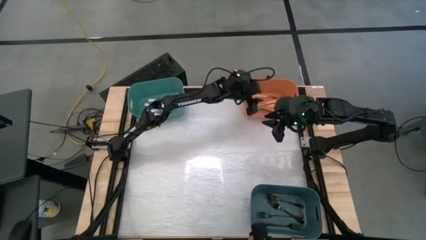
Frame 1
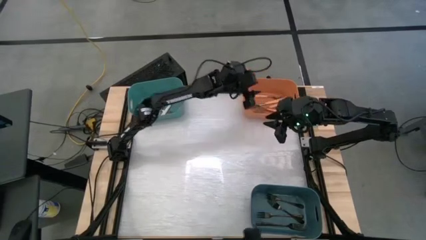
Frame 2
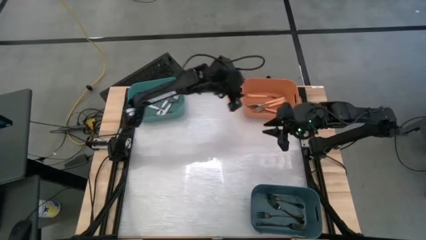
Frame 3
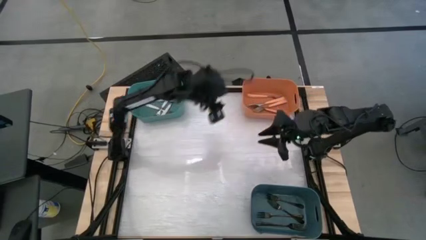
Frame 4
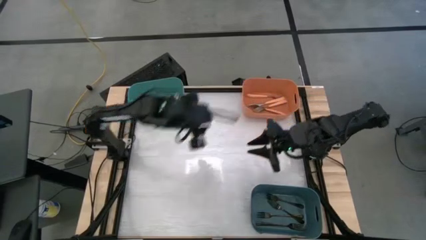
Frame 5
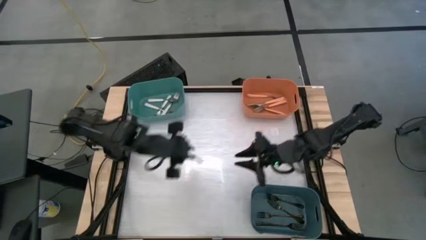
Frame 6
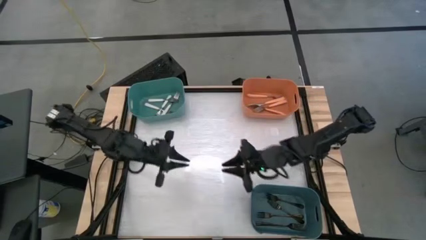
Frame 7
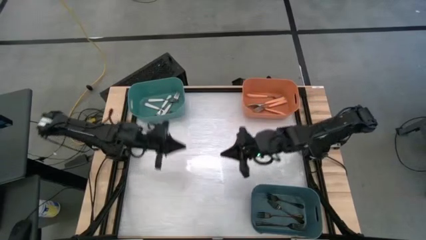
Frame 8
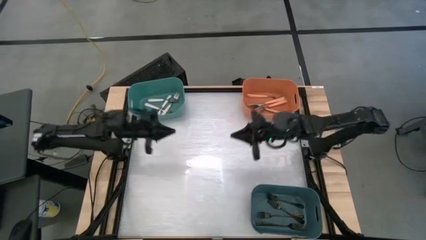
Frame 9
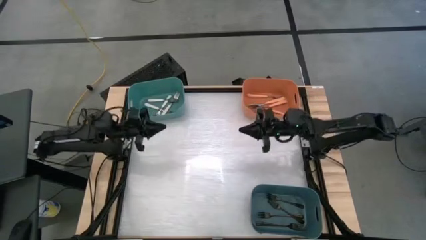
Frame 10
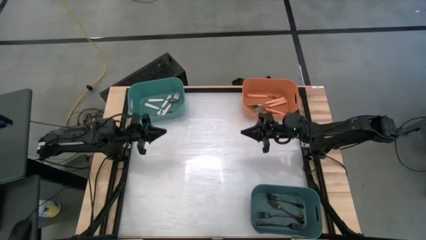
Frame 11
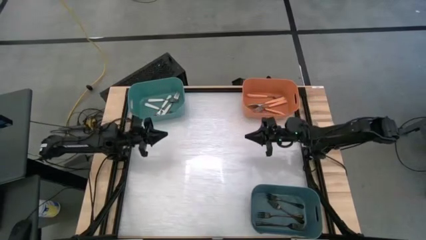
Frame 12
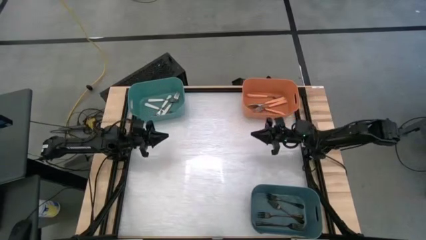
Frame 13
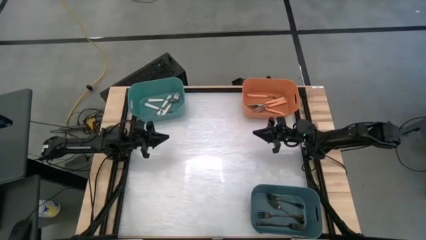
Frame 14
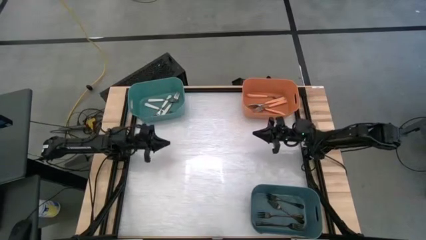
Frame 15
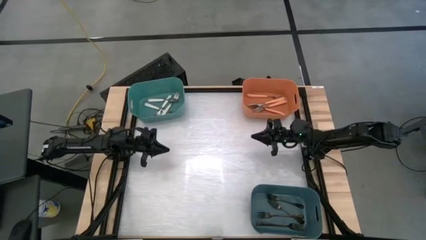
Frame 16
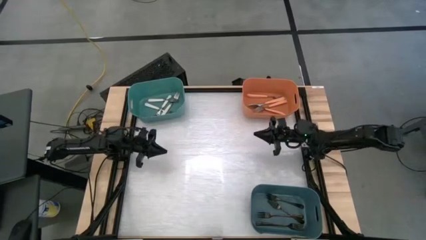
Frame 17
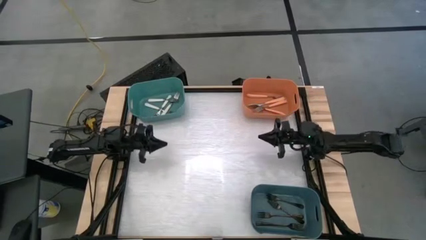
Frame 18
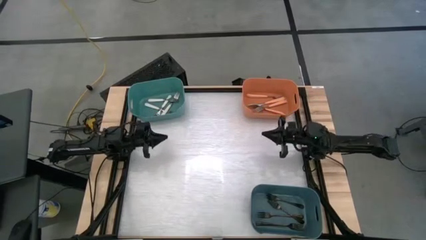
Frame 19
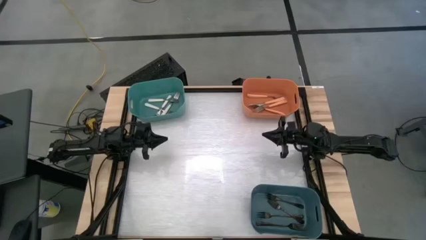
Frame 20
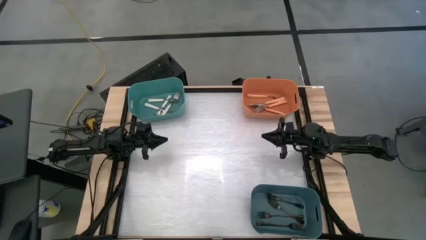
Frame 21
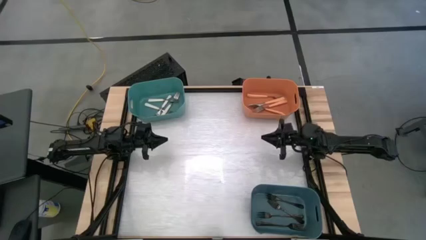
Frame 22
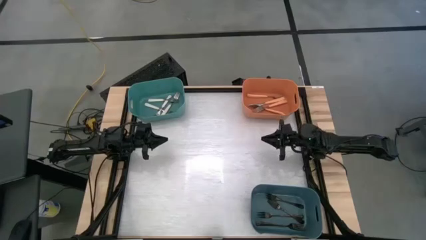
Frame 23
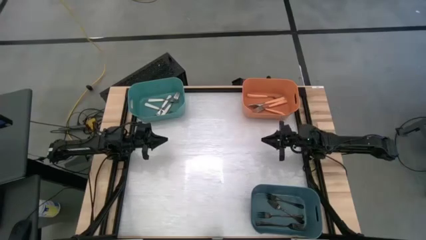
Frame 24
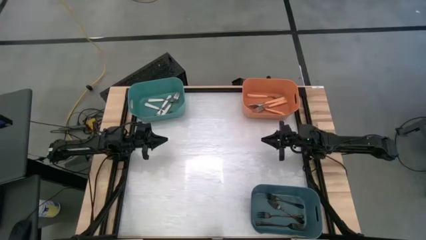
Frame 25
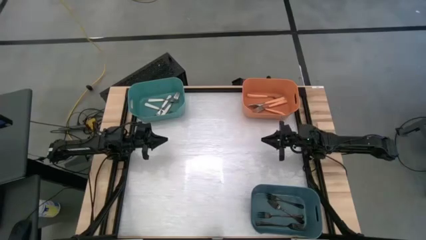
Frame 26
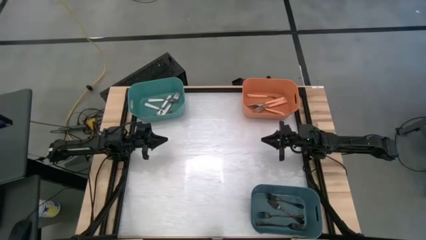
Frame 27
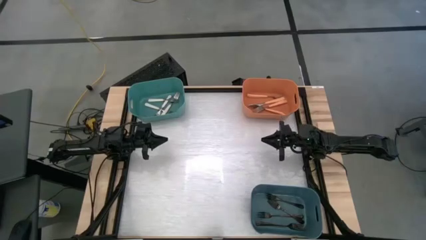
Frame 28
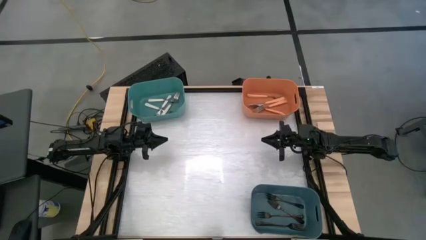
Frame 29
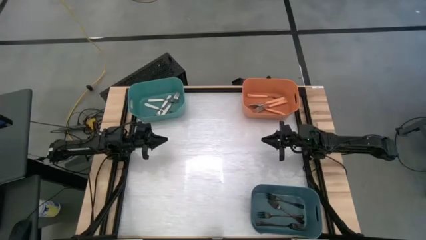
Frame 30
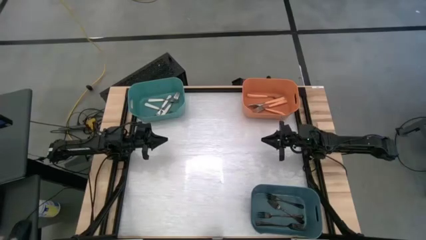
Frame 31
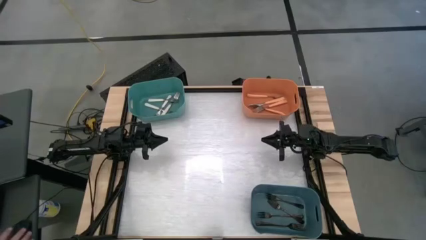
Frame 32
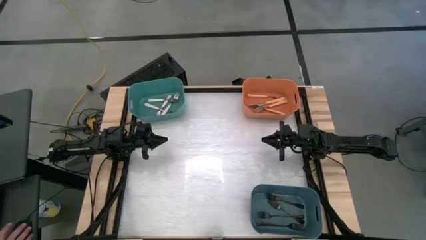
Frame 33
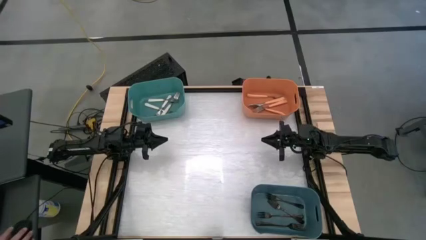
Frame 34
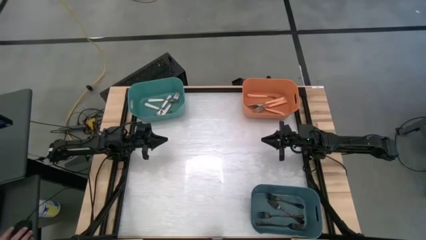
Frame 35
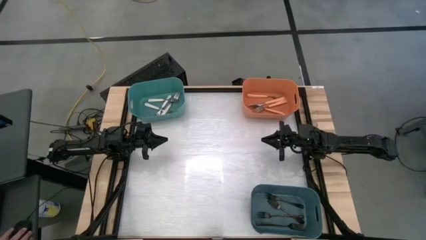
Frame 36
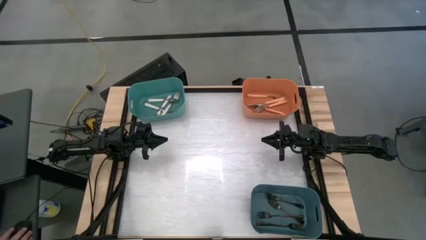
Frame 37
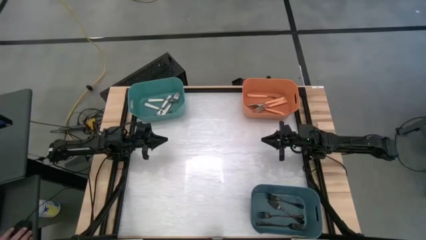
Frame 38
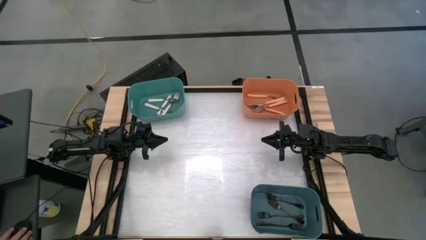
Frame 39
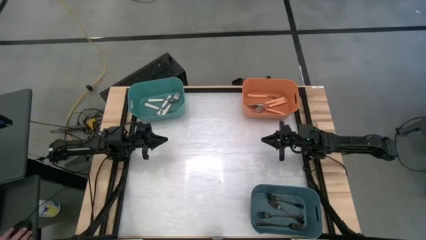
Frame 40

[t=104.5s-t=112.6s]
Task: Sort silverware by color (type)
Return to Home Position

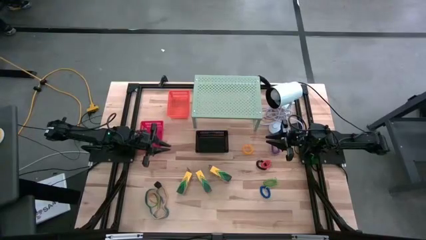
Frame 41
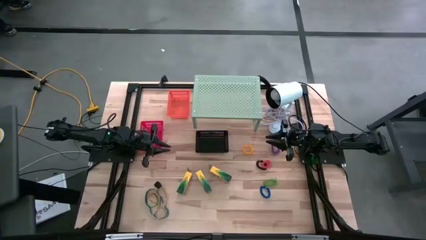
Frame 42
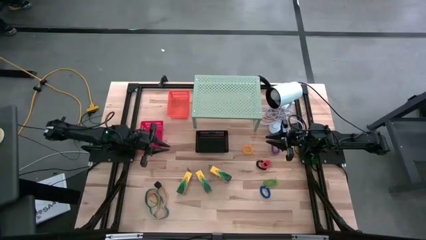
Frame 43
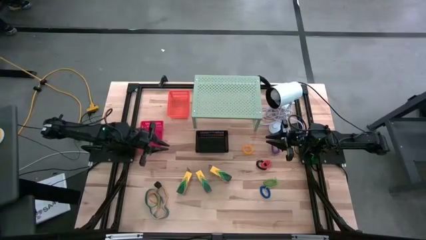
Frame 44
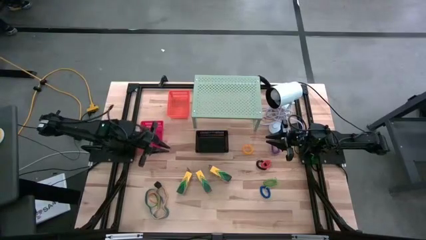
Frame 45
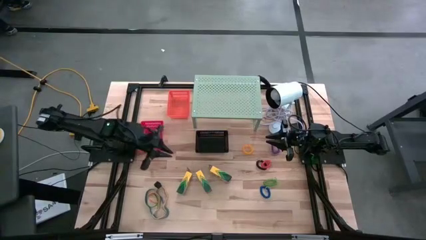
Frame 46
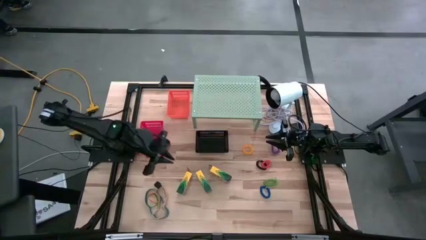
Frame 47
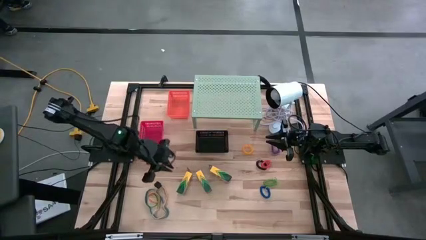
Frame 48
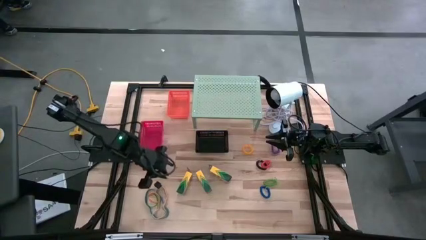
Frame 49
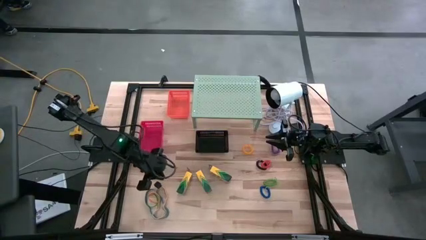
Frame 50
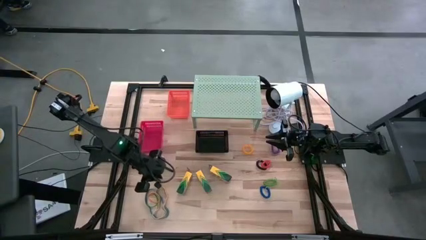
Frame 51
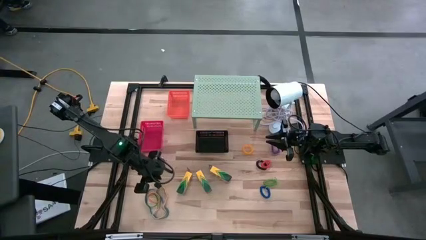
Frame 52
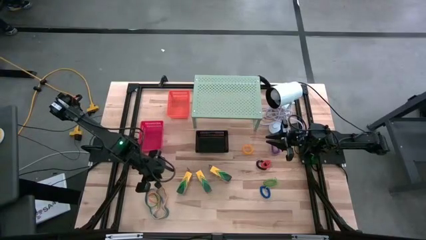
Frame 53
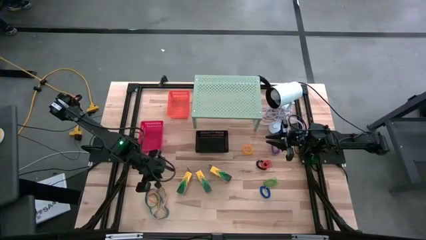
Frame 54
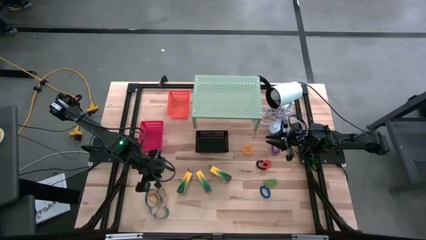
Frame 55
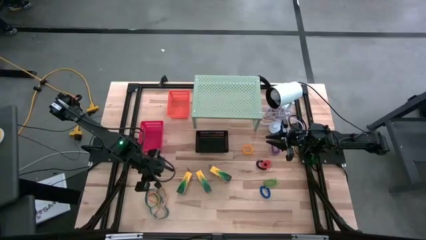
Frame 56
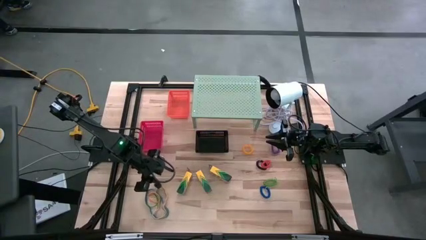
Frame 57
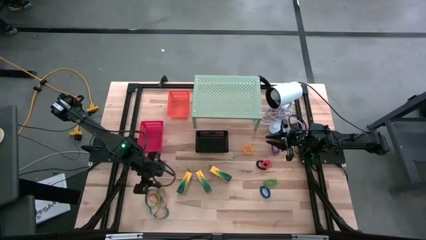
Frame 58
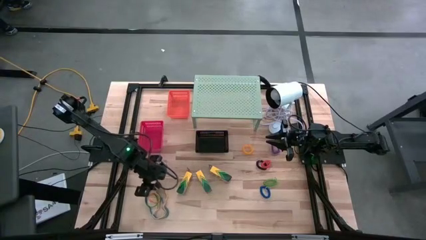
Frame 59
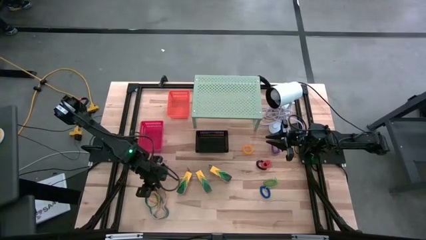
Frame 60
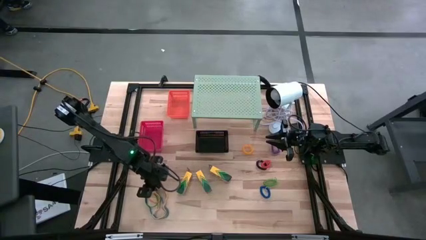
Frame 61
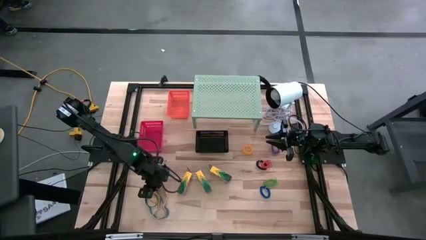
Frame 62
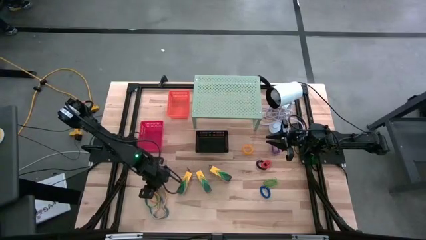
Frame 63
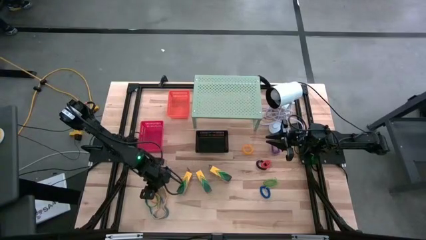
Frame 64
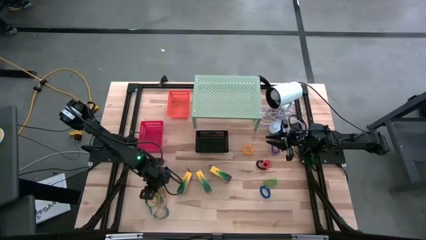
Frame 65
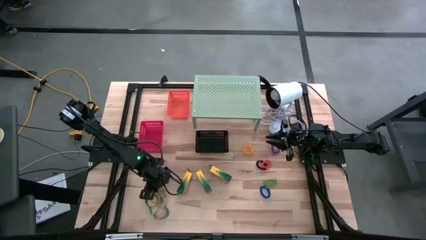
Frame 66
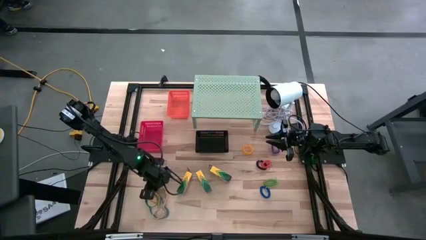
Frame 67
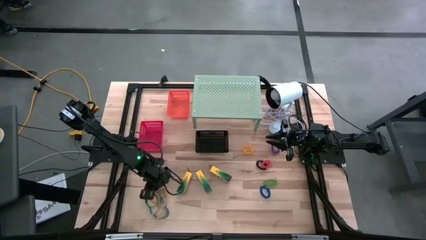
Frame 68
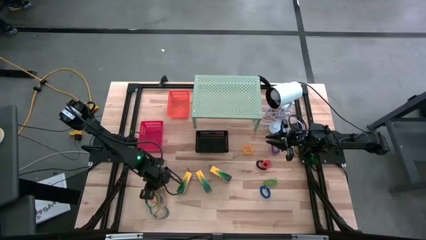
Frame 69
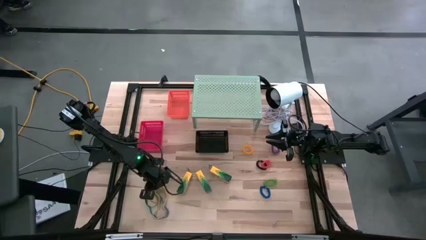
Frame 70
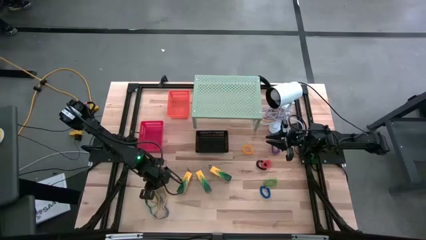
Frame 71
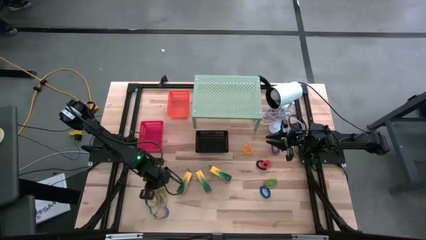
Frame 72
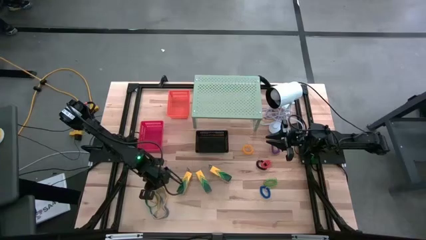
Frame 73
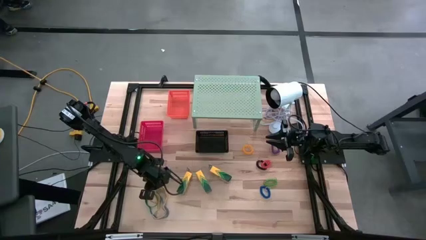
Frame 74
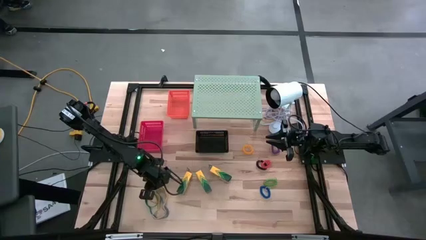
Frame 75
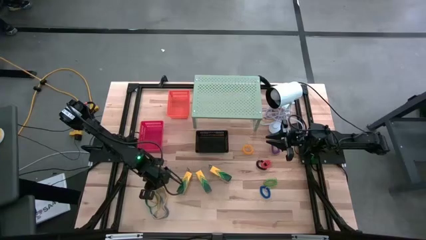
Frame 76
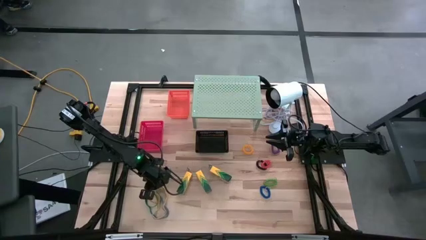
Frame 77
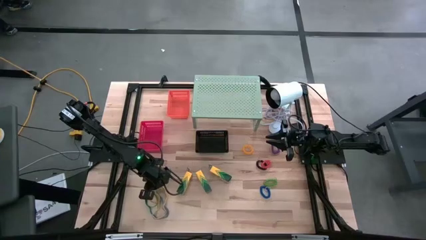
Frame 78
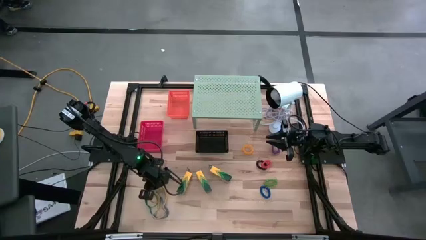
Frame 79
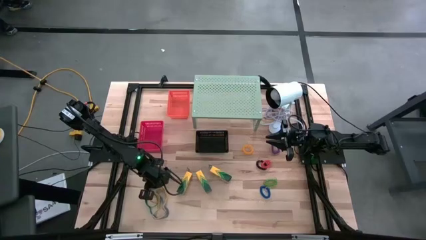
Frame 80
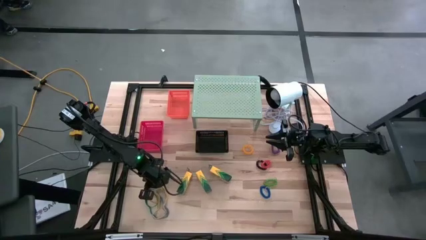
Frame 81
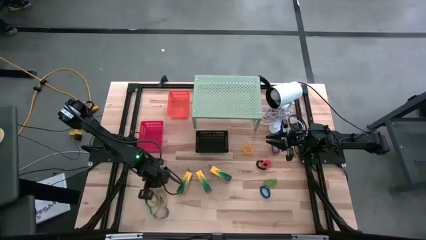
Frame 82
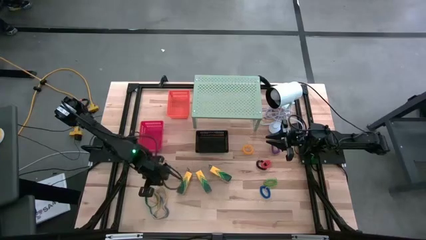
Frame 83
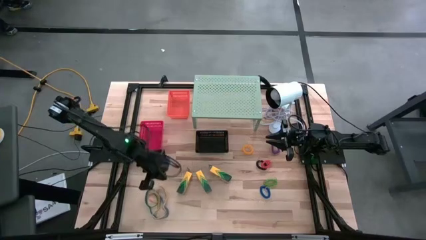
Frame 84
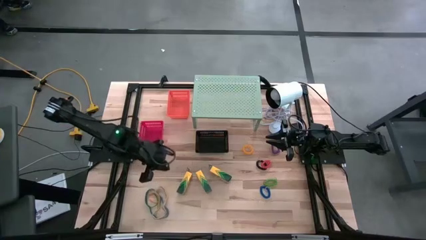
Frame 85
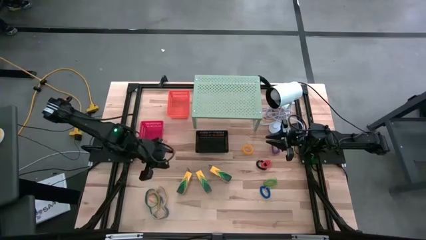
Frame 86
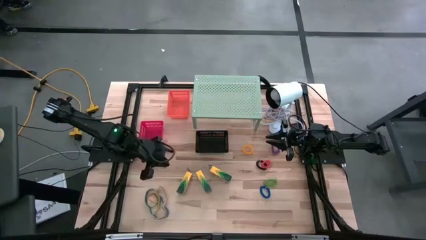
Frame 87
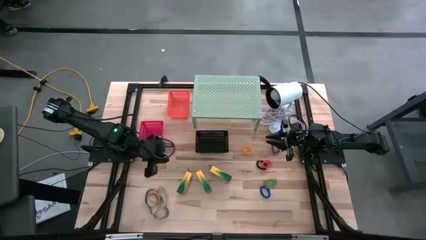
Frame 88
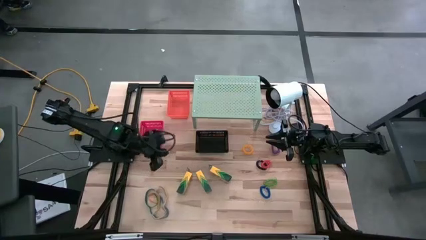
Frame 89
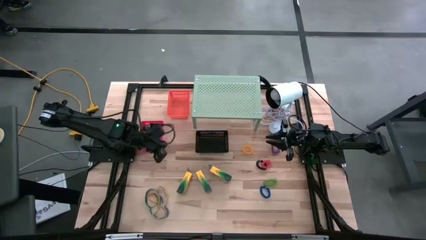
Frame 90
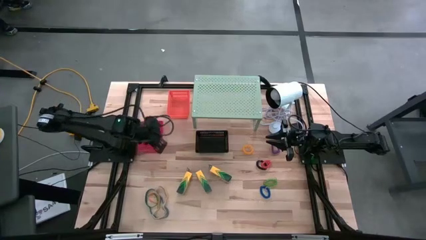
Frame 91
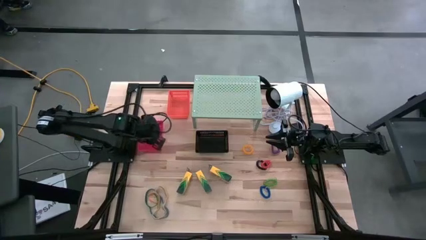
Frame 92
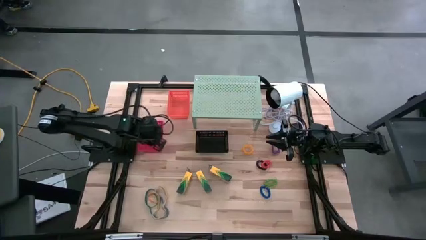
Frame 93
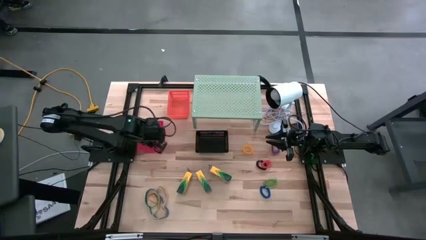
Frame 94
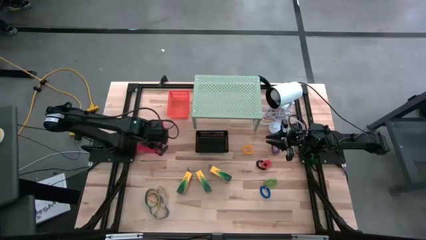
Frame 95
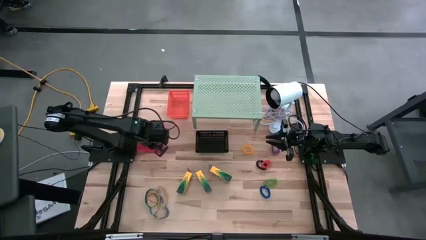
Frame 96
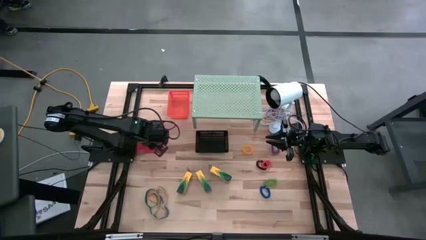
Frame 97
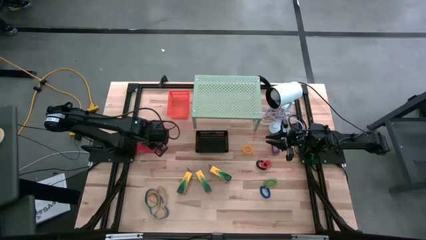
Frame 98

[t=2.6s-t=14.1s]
Task: Pick & Place Office Desk Supplies
Put the black rubber band into the orange bin on the shelf
